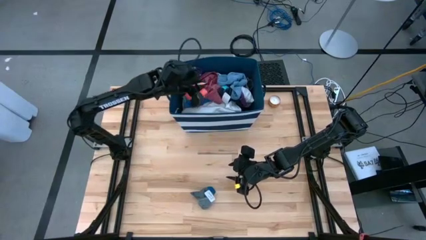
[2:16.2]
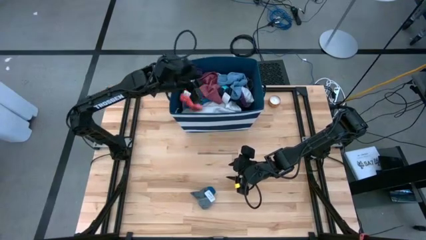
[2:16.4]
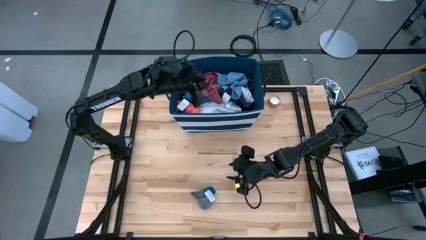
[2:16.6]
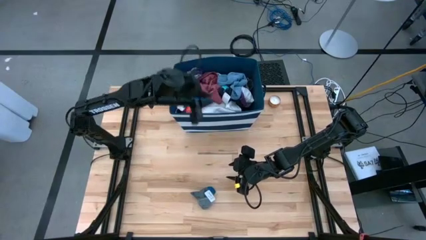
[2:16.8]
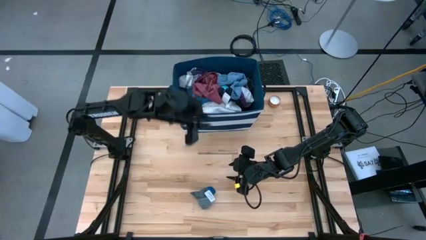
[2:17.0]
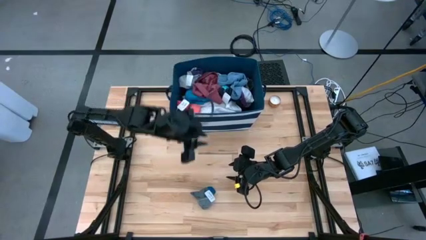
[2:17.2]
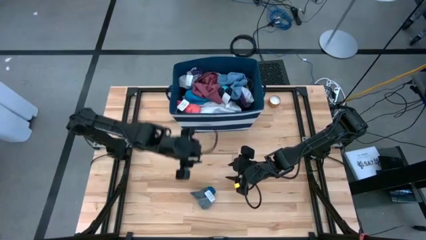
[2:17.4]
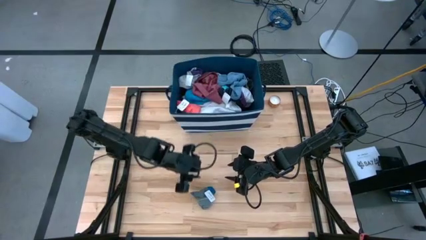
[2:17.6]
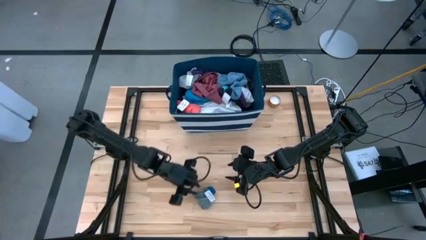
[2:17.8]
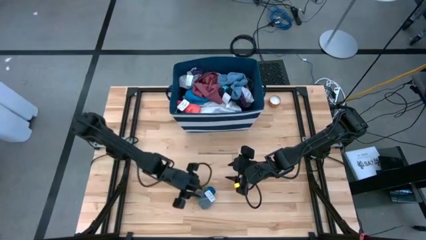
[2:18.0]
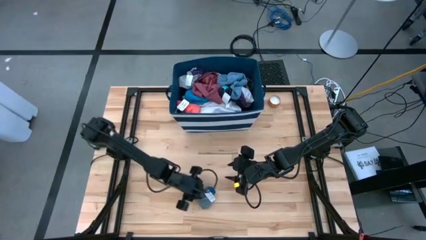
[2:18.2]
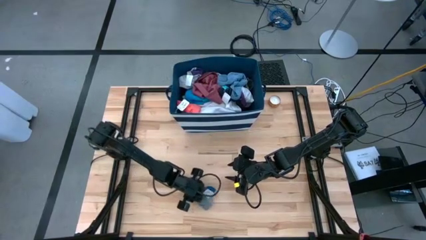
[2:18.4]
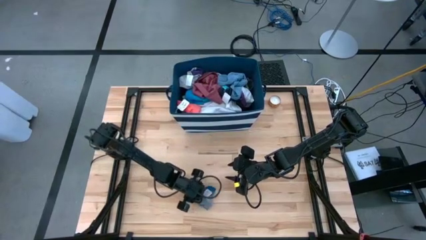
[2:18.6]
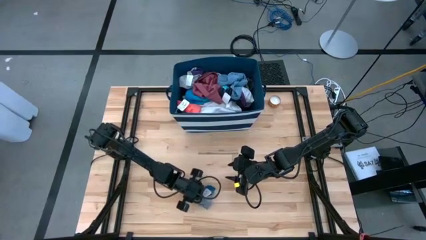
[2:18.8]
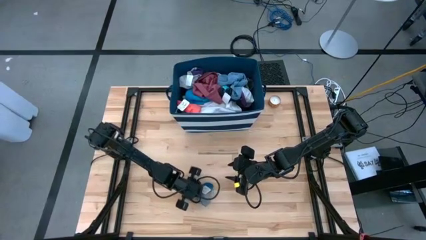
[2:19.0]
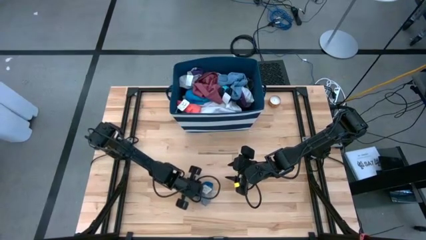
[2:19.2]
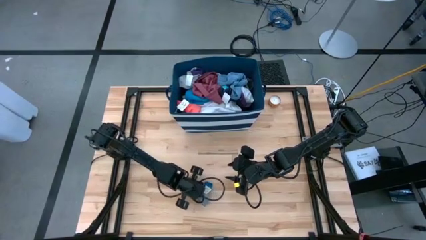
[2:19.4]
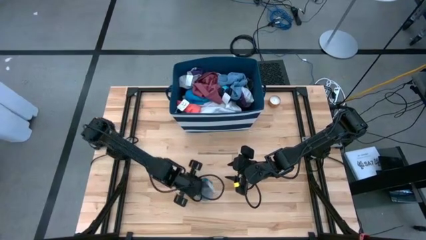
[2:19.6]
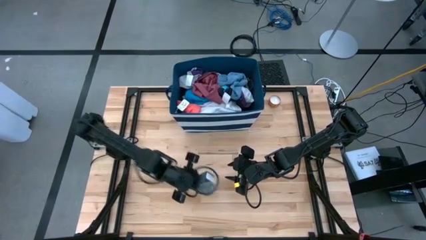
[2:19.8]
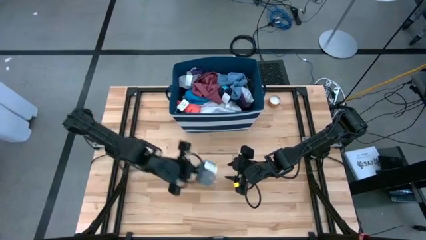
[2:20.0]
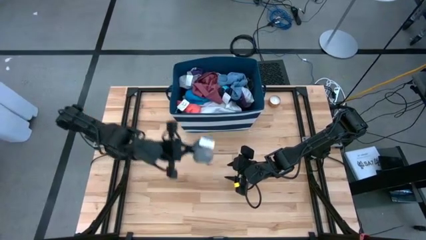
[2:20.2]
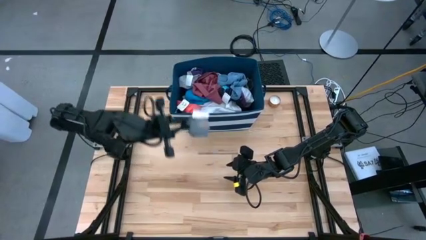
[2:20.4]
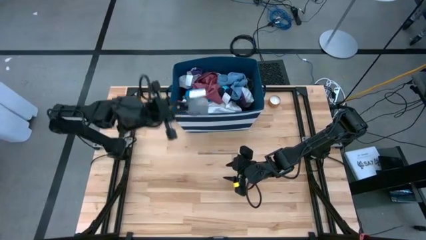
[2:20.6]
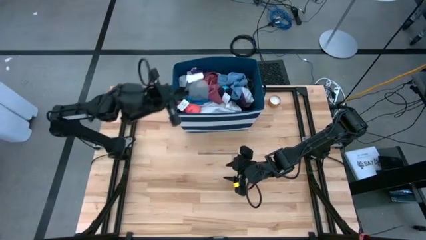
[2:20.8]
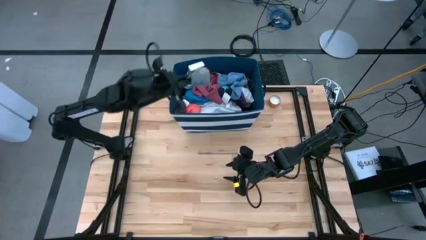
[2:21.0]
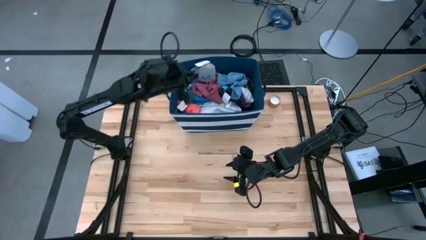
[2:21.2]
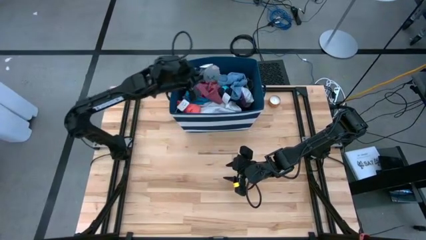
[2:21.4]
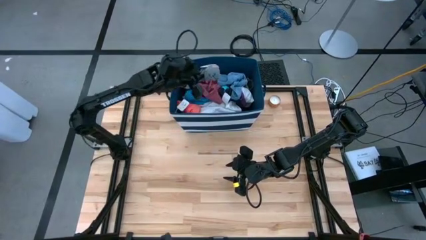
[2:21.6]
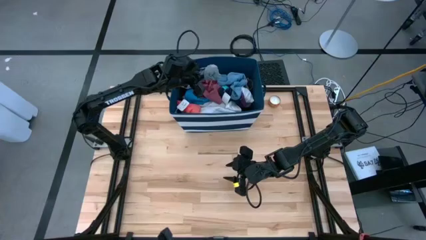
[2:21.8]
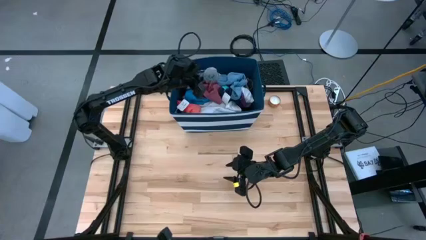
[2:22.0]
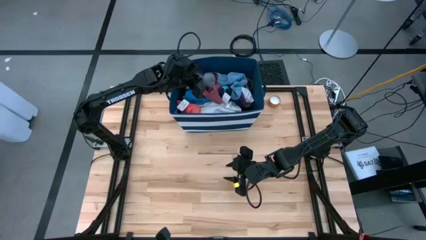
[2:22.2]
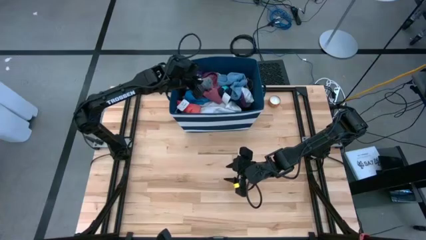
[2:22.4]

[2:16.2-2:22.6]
Task: Sort clothes
Put the gray pair of socks into the blue laundry organizer

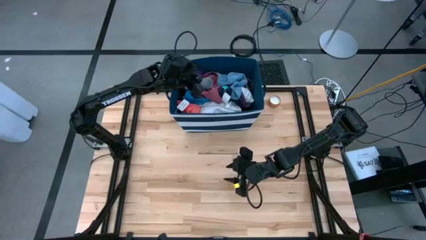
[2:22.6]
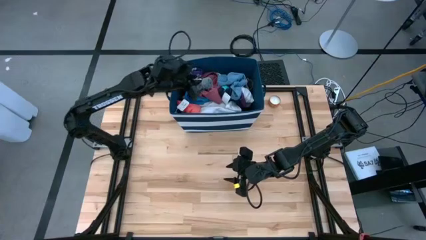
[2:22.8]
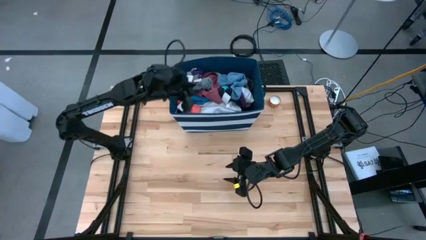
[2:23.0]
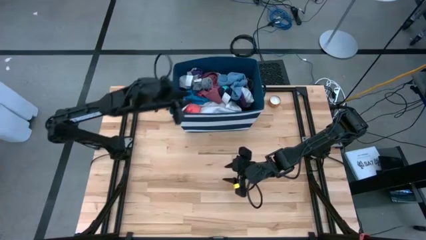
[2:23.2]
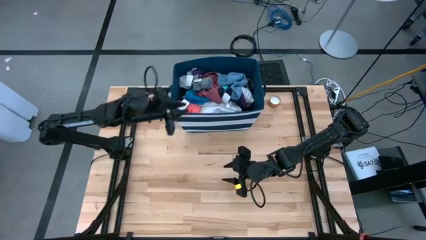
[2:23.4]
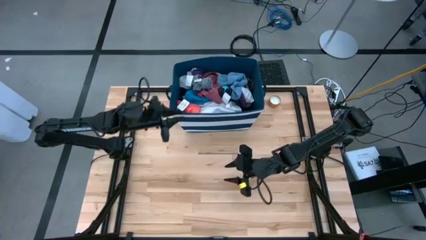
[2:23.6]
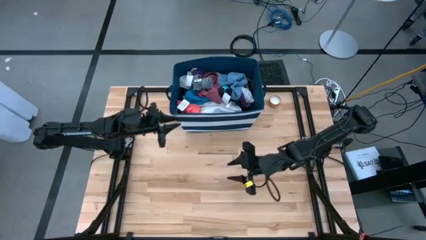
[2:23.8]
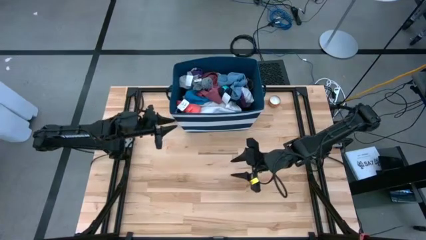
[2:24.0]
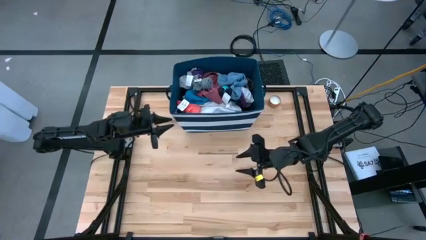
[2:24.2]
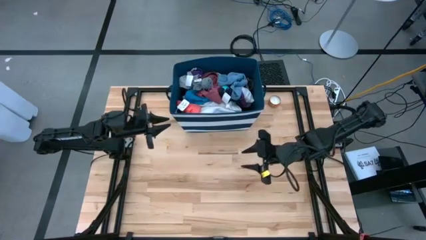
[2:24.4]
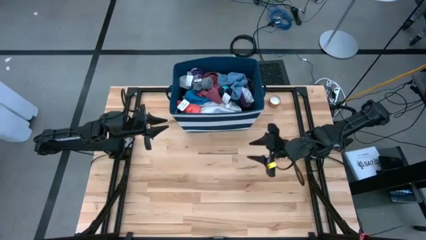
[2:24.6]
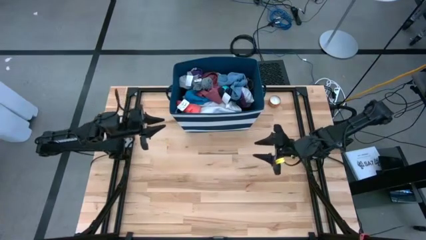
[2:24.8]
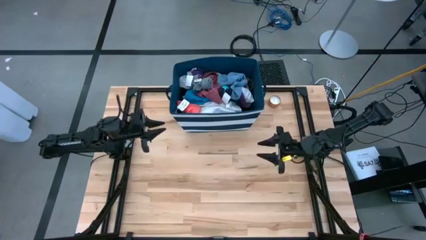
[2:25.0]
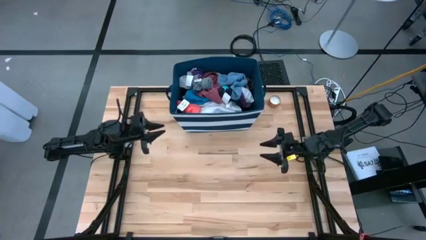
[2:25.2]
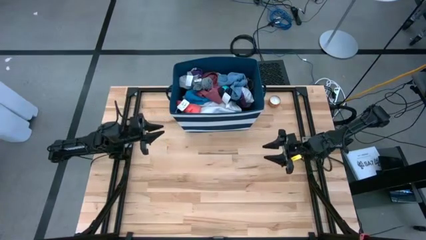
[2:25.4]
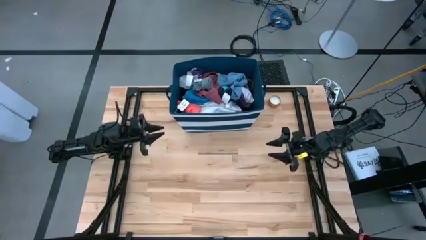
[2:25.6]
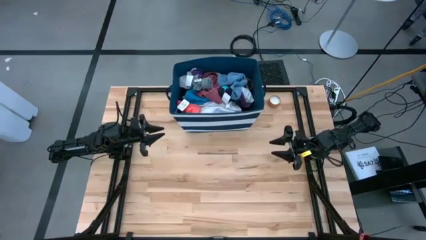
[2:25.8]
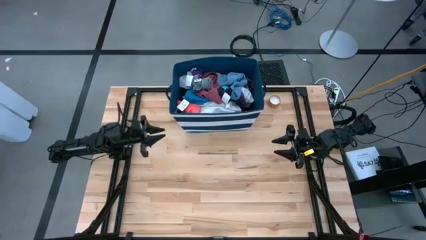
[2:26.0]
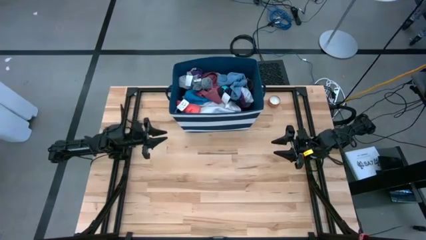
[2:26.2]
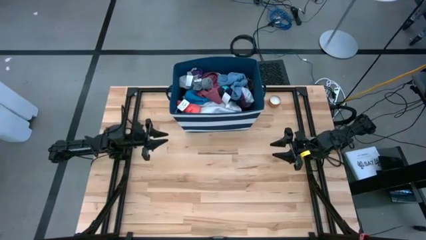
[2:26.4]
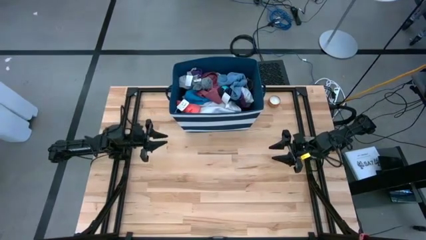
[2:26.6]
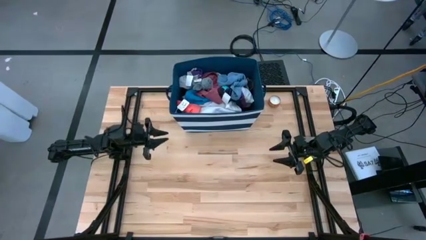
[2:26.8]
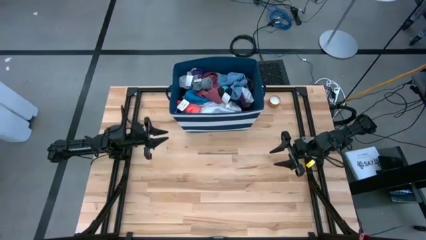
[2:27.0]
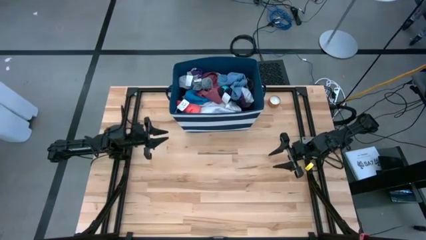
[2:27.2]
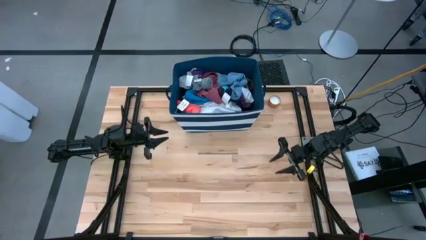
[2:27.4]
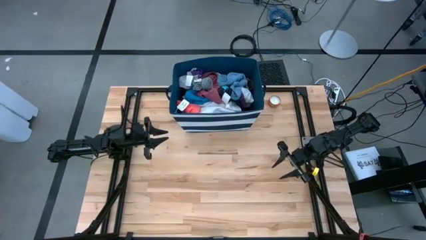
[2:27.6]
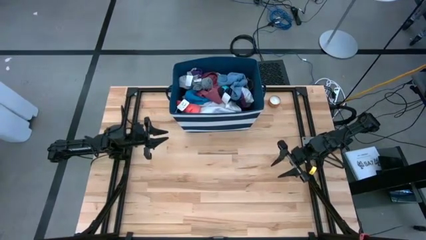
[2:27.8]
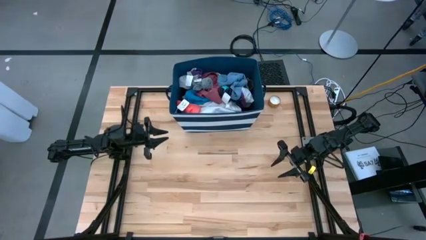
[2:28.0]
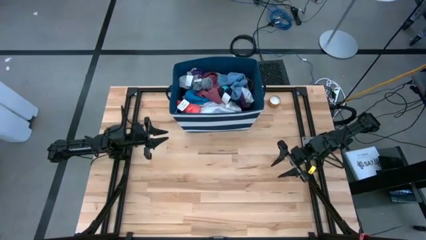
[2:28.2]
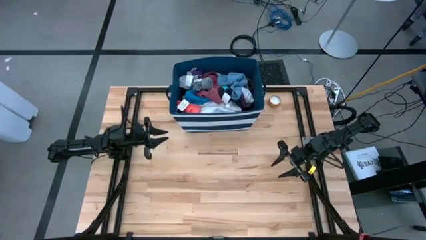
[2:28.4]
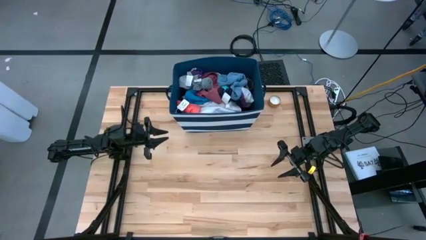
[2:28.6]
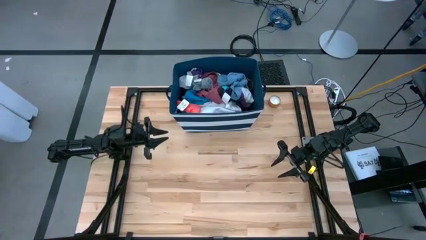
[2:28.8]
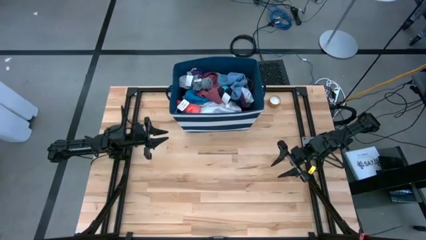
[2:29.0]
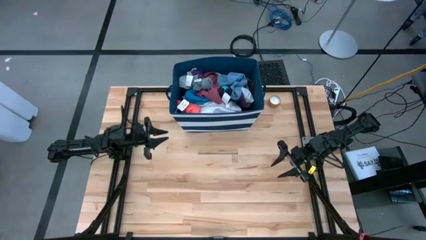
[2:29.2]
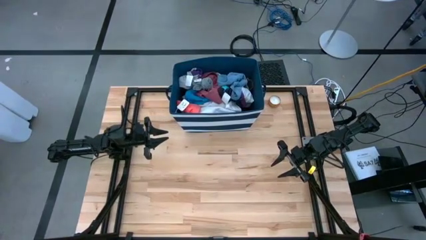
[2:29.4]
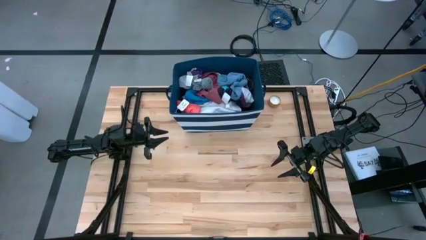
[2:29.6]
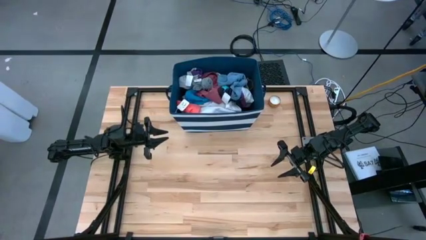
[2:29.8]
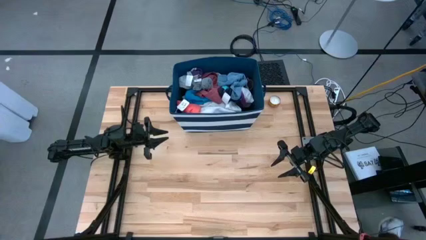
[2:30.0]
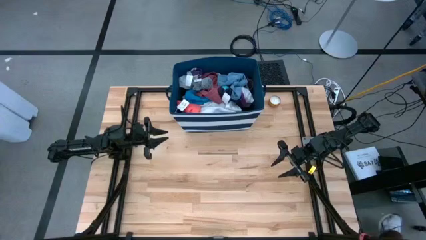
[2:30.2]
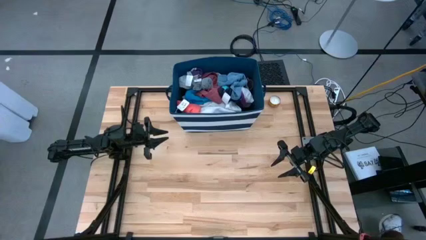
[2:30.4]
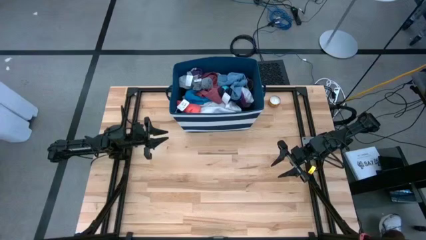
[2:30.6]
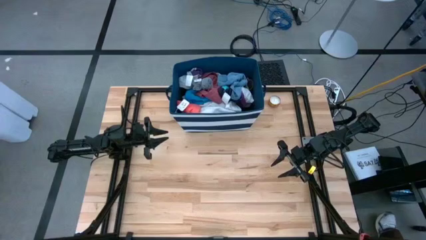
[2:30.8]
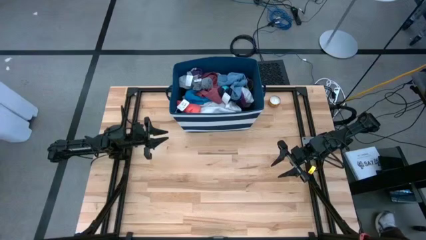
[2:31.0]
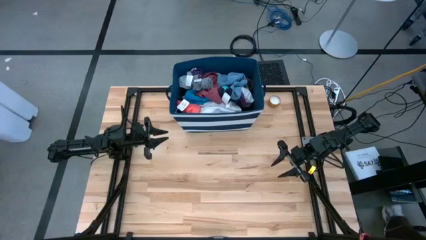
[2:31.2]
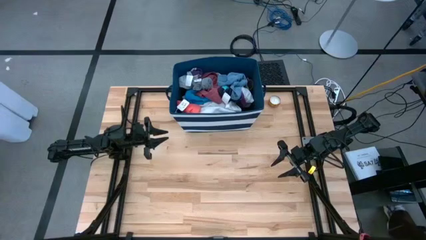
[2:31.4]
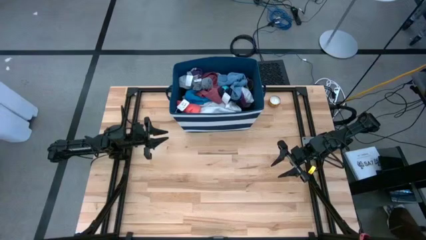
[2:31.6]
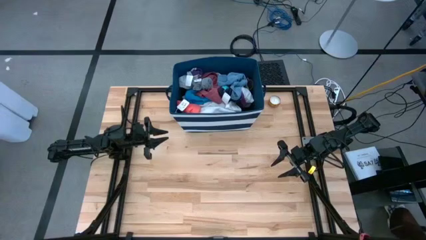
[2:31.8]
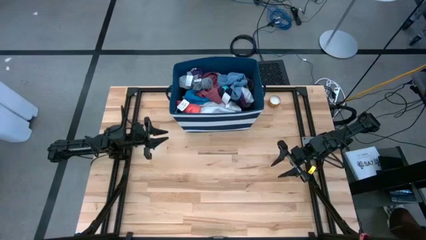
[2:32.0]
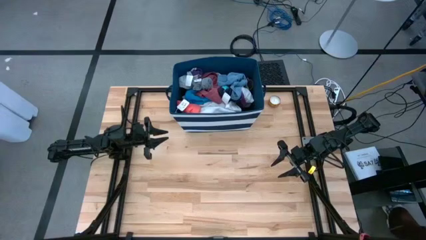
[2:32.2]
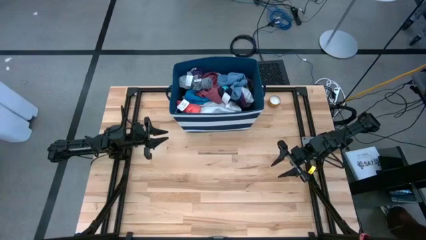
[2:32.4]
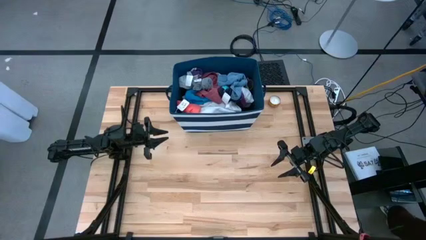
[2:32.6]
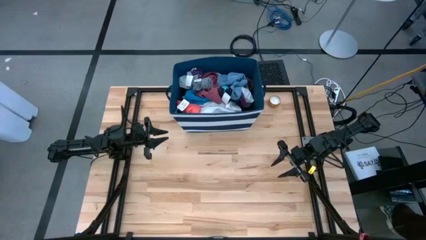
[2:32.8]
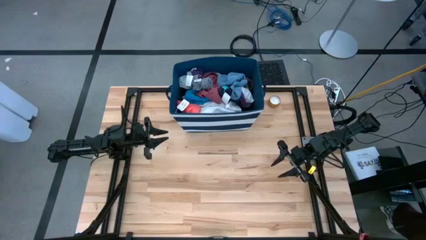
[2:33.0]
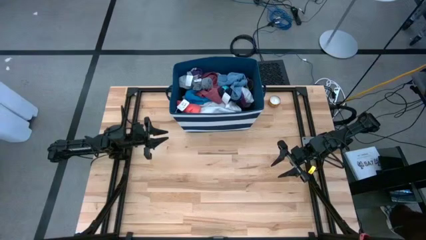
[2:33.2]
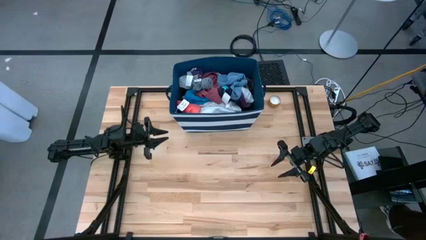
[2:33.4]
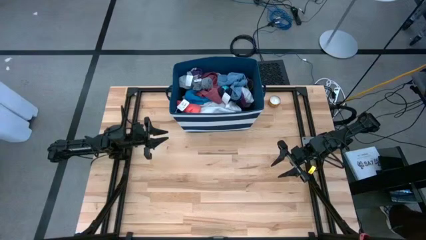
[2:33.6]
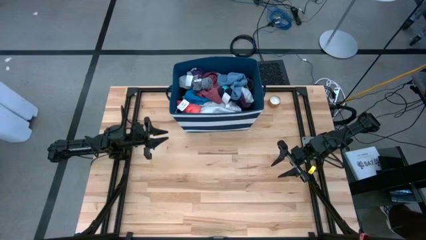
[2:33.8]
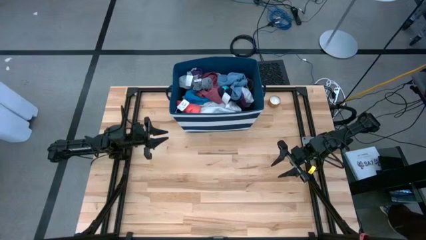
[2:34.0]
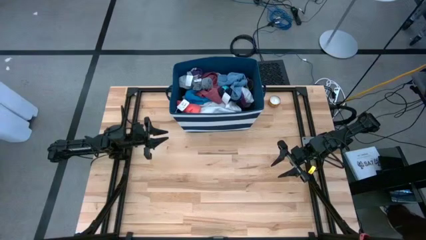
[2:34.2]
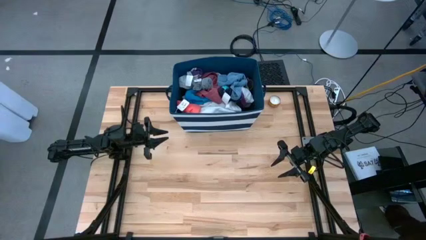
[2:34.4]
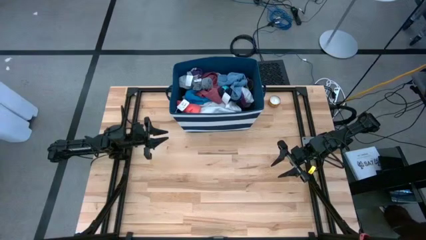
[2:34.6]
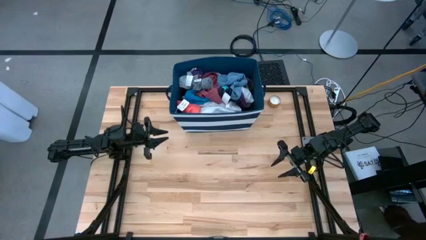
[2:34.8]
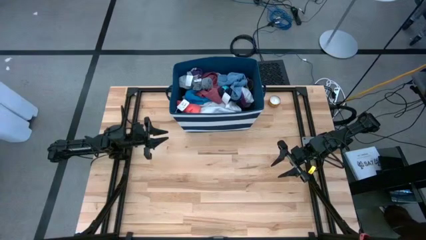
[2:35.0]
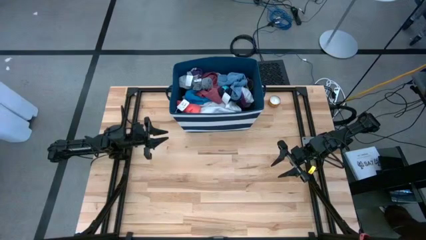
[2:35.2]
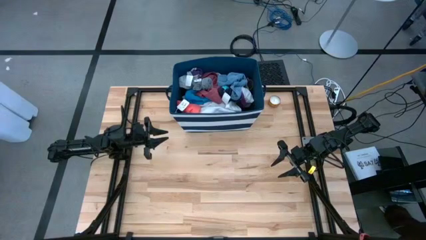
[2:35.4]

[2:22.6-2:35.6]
Return to Home Position
